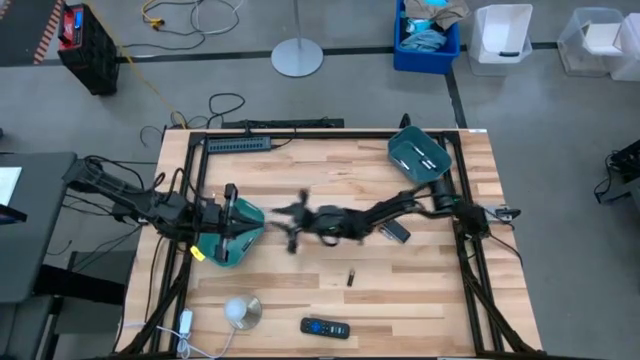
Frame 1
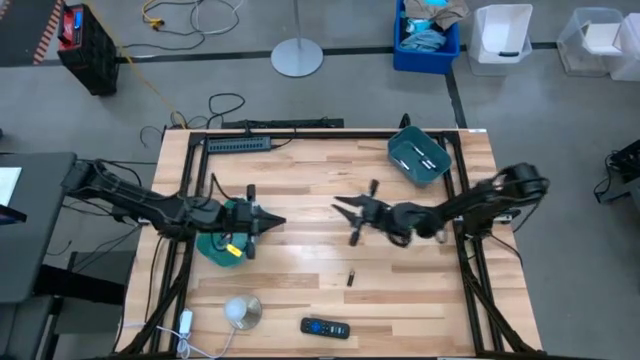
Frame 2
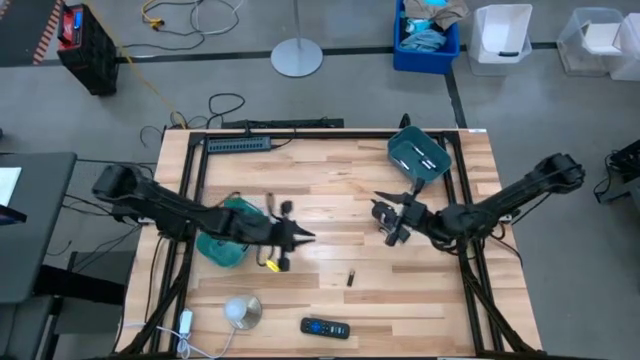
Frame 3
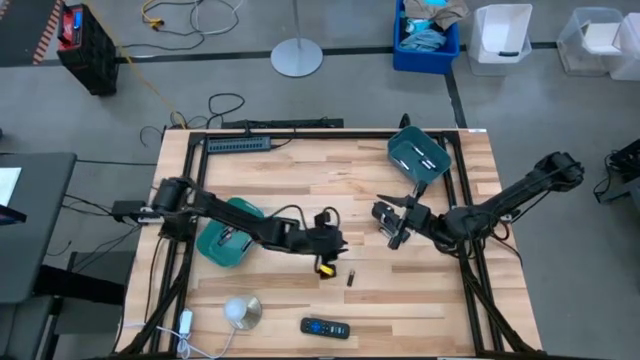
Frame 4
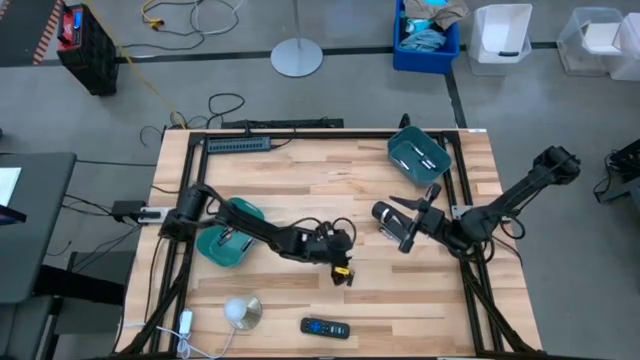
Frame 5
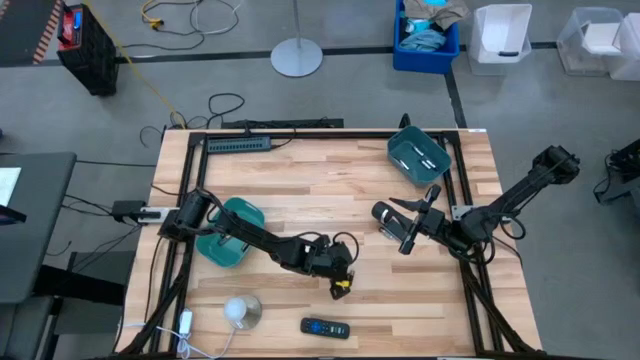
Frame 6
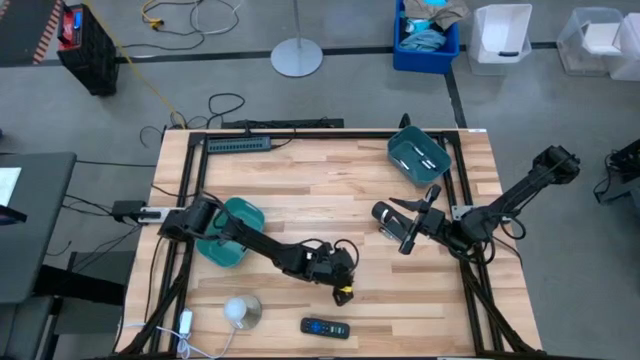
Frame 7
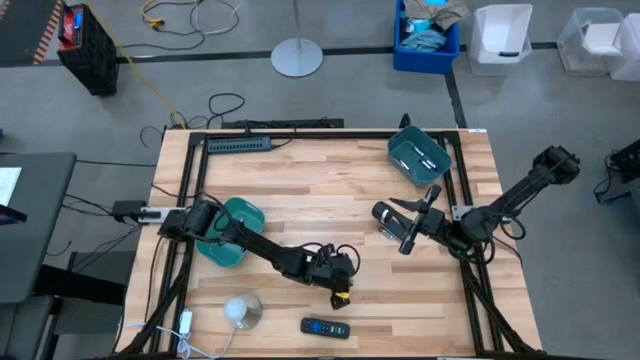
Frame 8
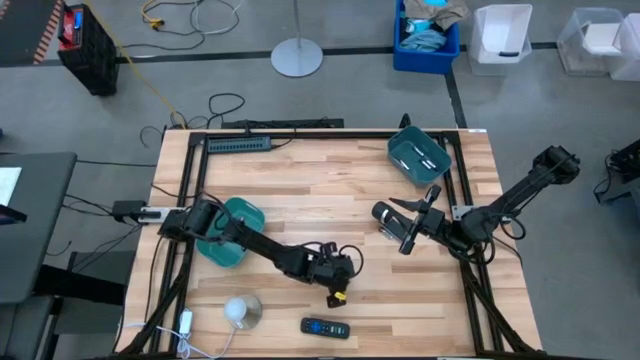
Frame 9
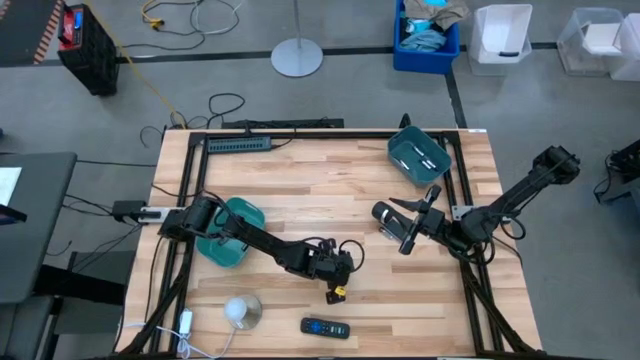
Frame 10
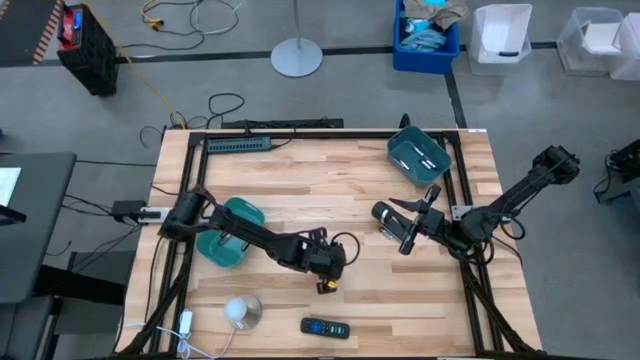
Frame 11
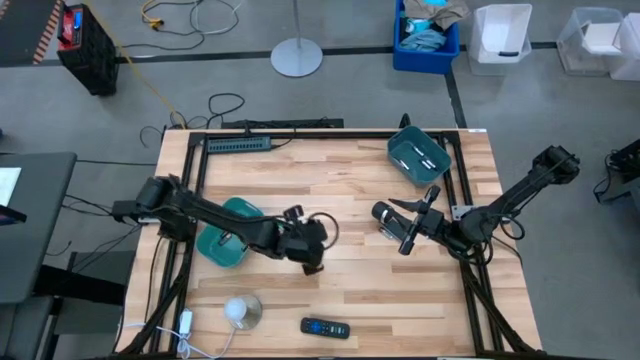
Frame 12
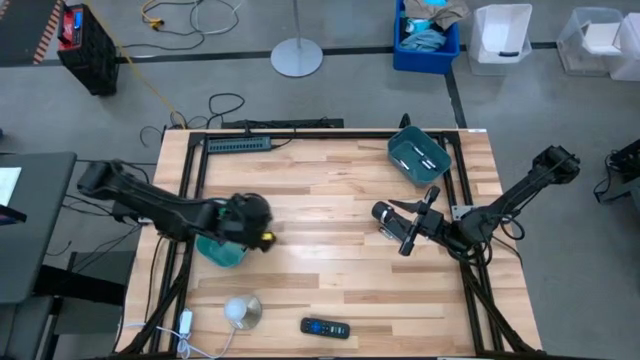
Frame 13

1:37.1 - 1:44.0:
Task: Sort batteries
Put the black battery into the green bin

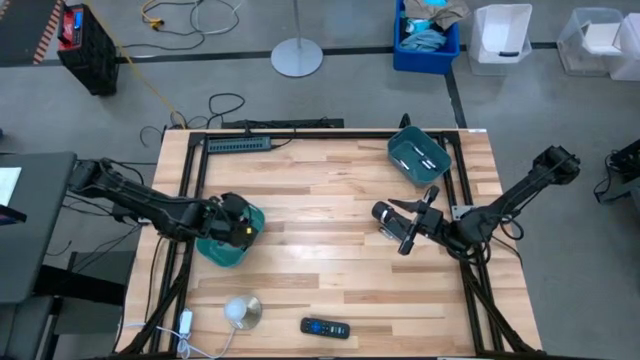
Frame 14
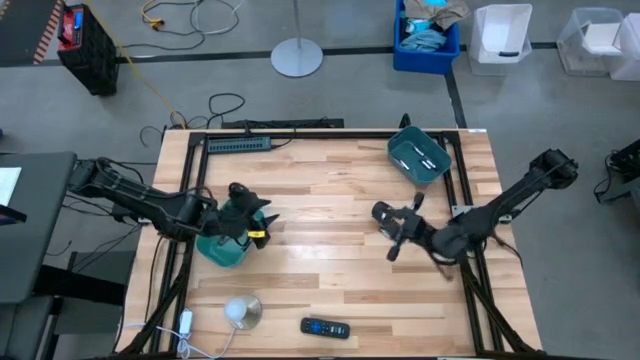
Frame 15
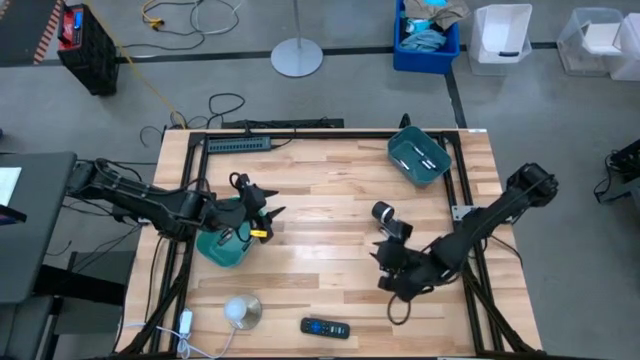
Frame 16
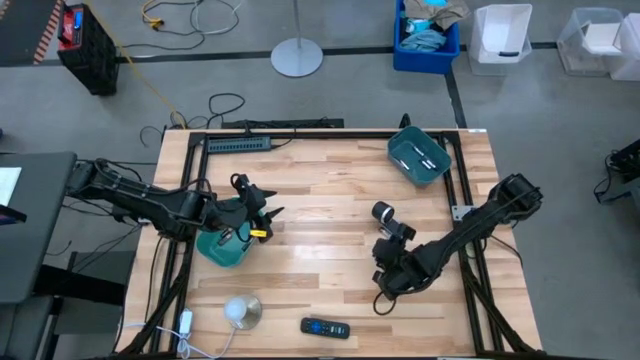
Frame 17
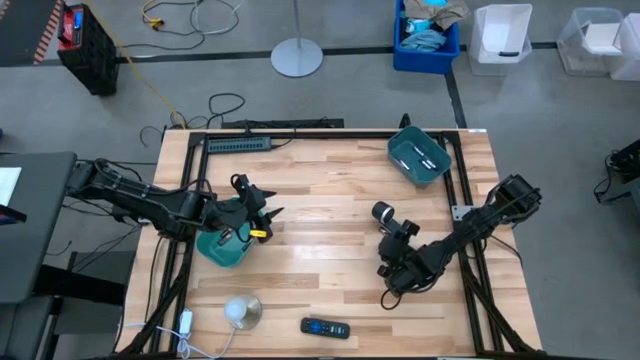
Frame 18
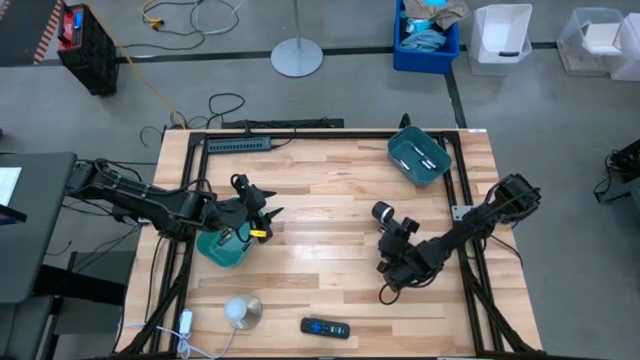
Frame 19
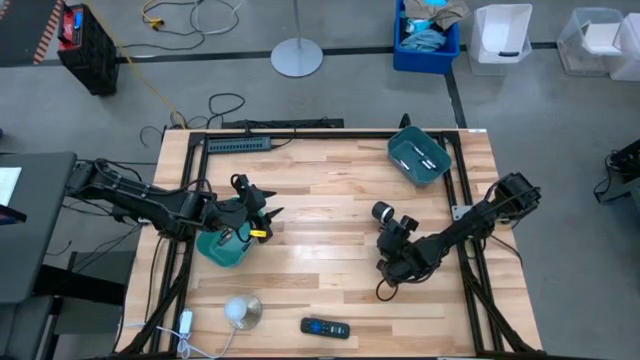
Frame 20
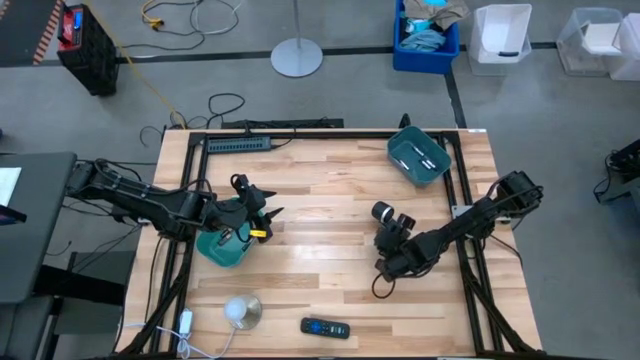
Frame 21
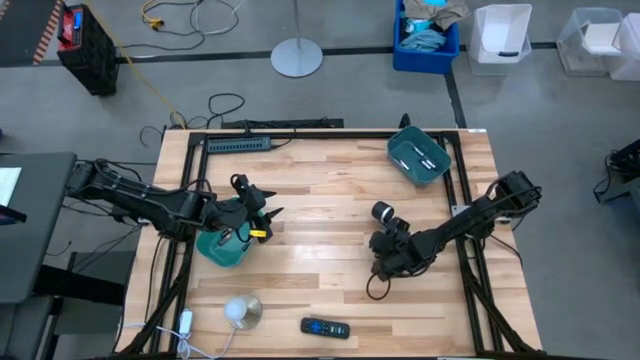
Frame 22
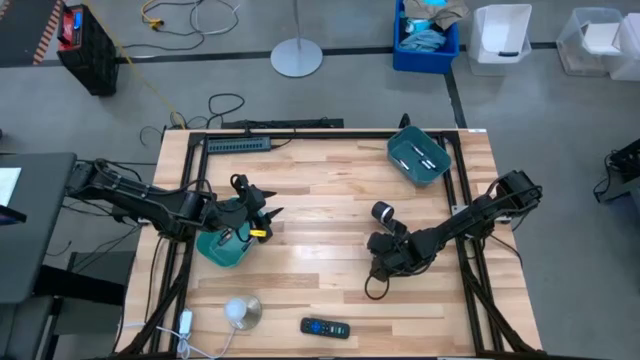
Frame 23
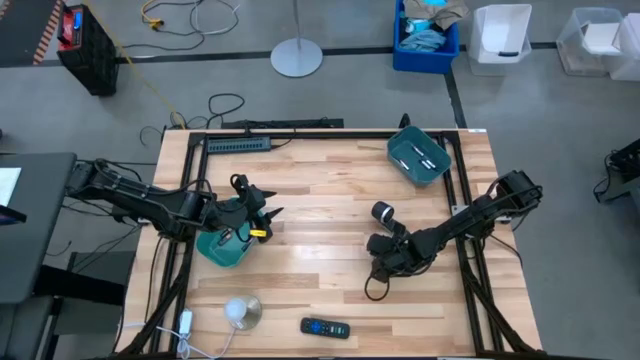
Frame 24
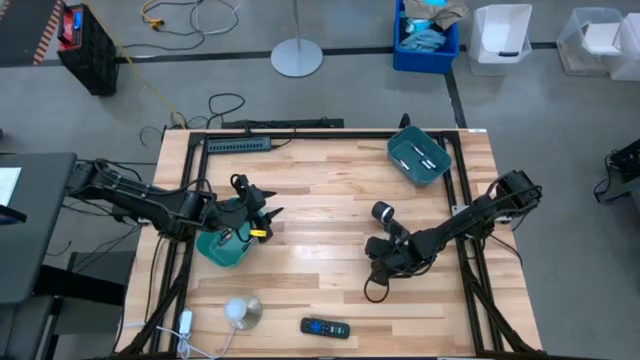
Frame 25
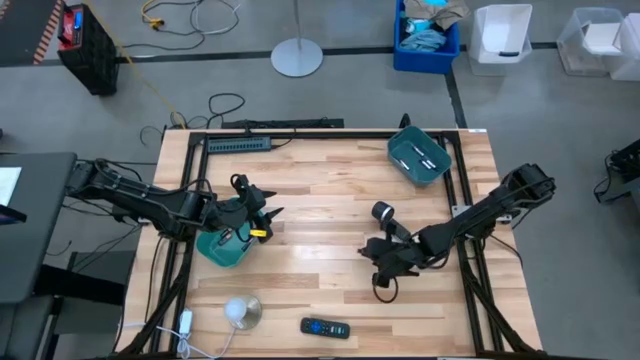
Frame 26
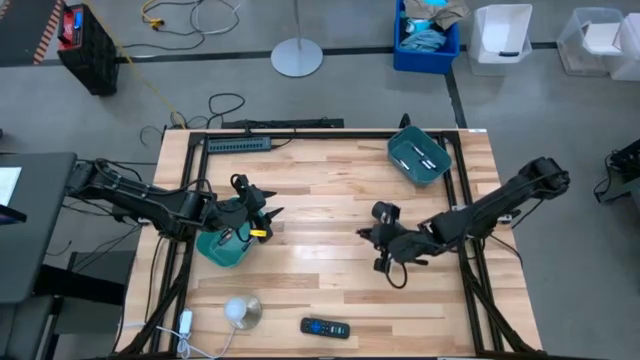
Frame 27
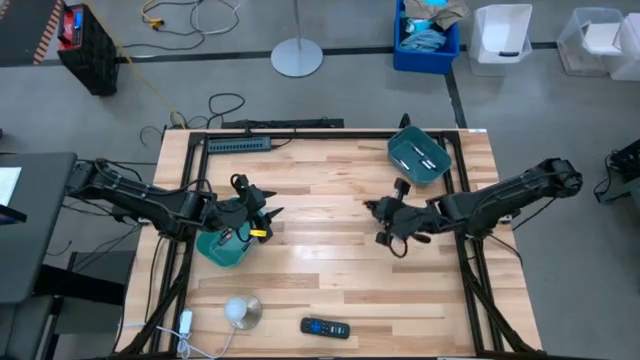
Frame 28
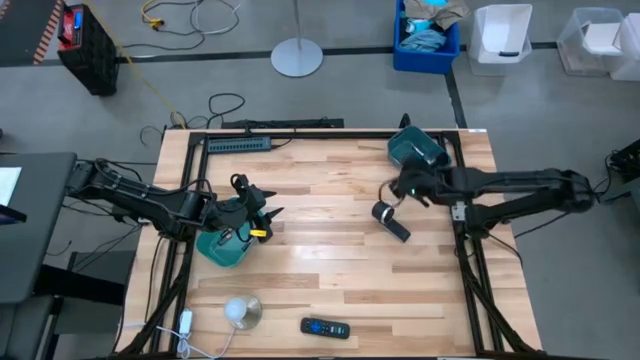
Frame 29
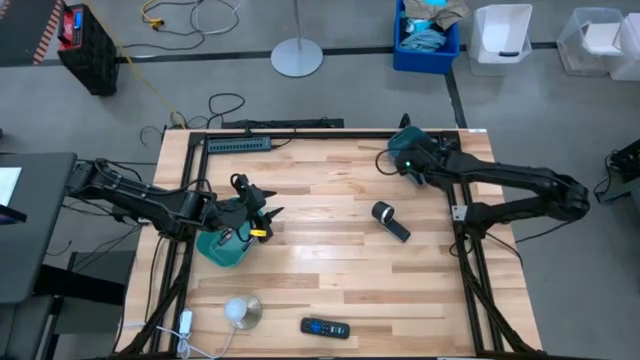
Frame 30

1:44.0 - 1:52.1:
Put the silver battery into the blue bin

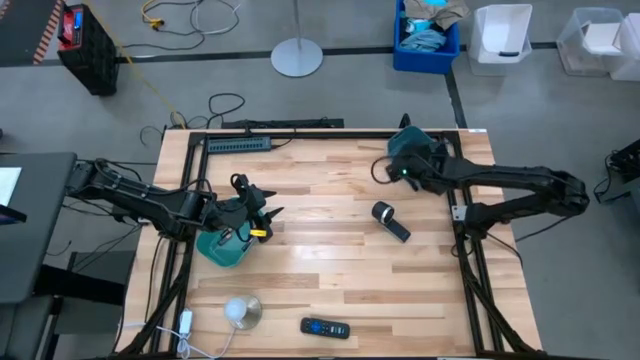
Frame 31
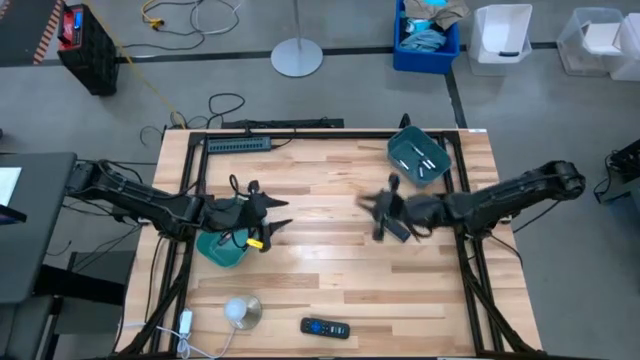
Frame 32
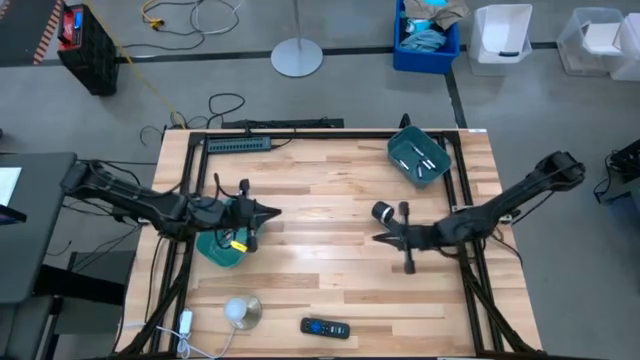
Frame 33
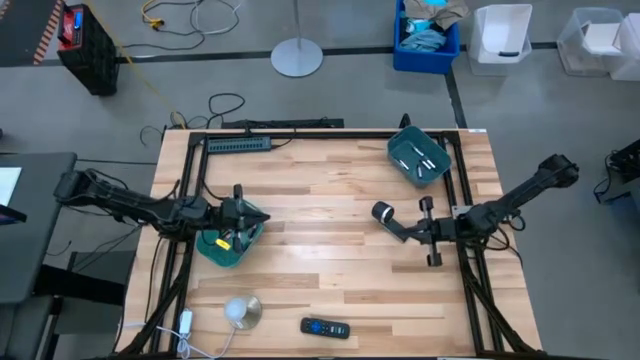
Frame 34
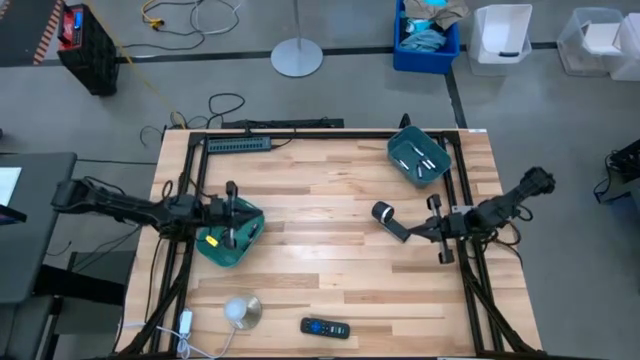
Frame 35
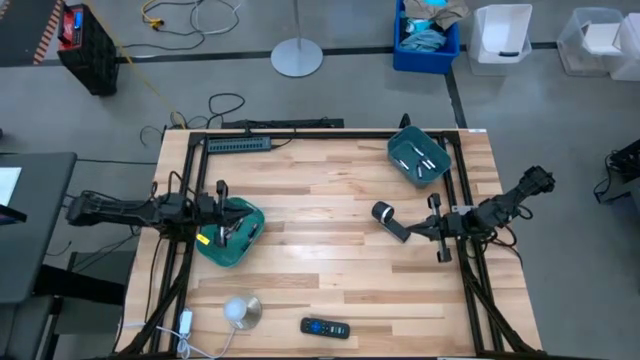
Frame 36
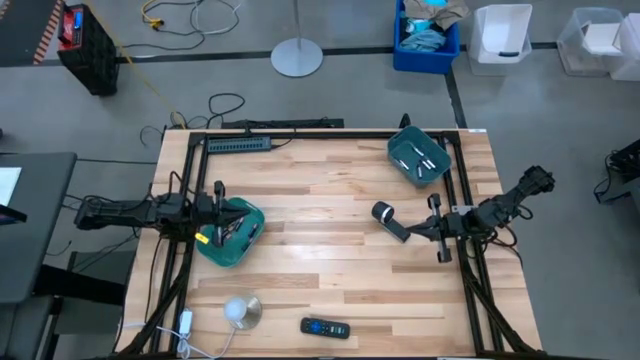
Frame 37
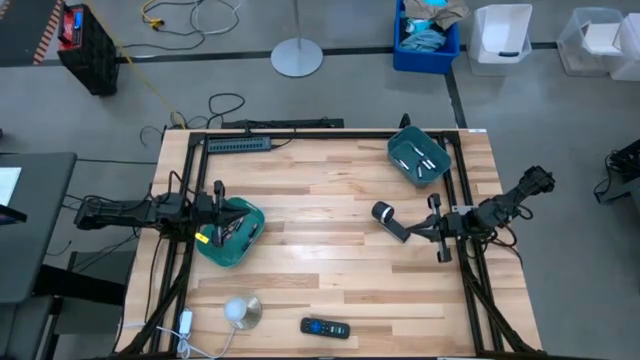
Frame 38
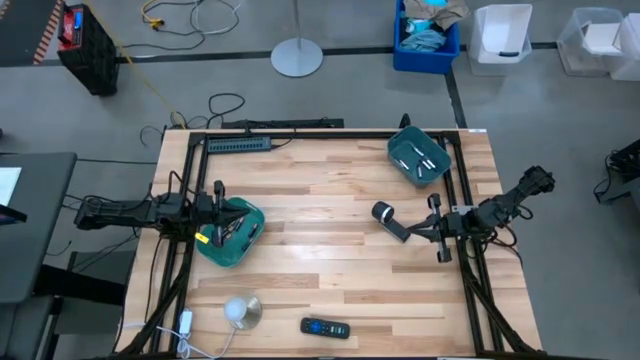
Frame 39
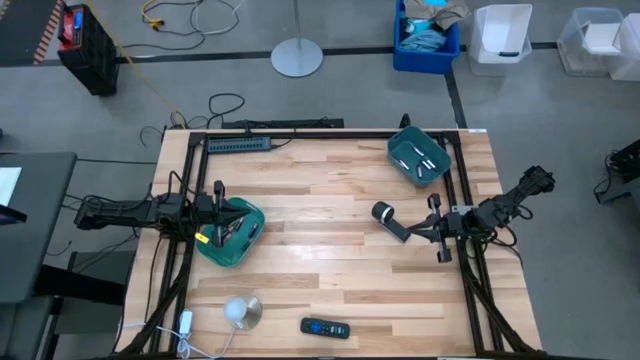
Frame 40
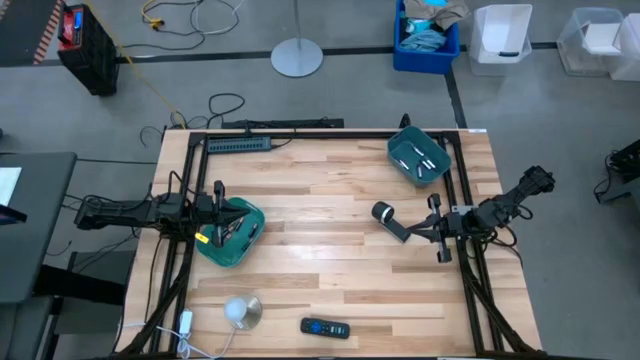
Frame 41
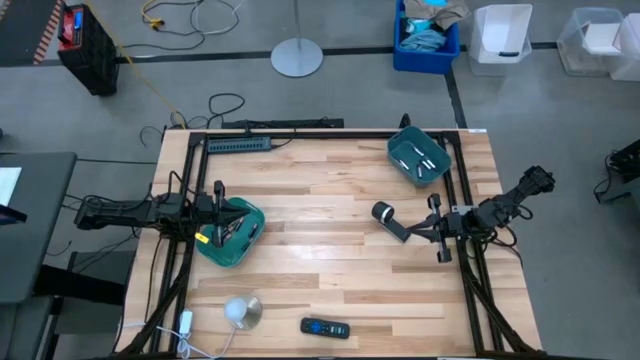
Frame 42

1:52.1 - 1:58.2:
Return to Home Position

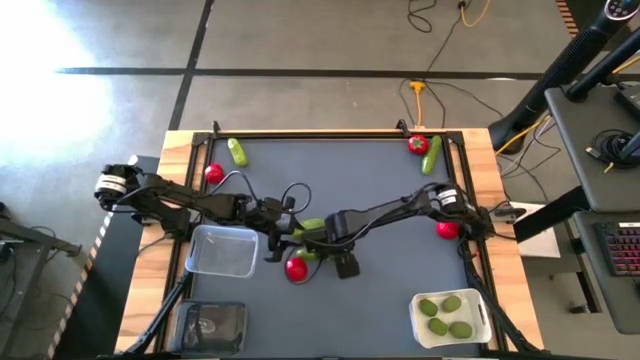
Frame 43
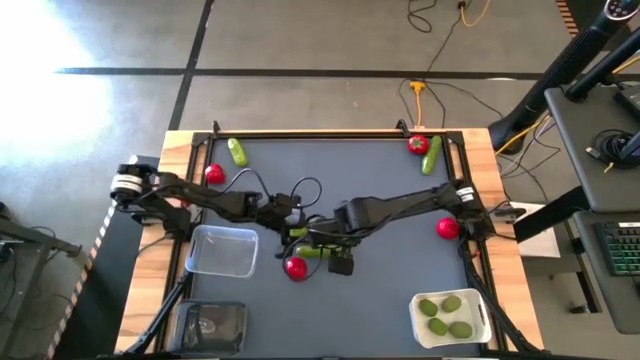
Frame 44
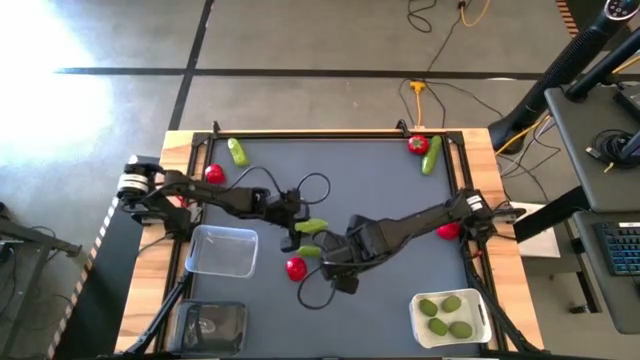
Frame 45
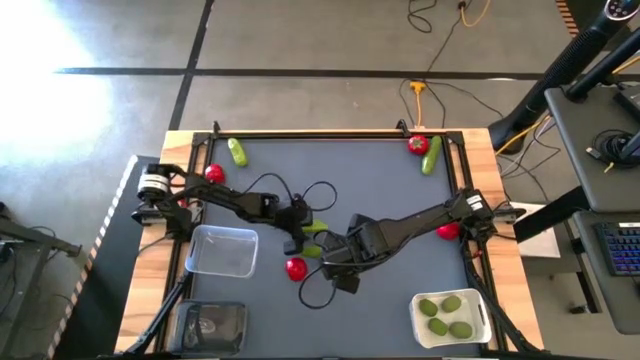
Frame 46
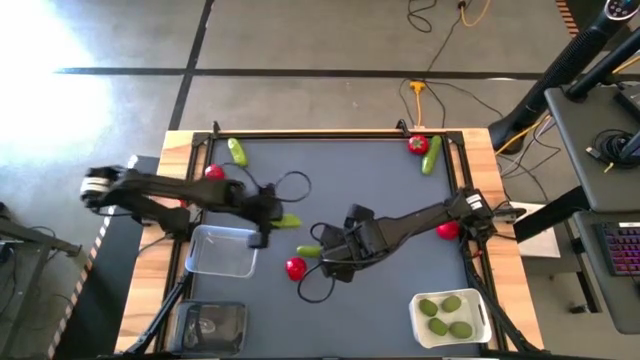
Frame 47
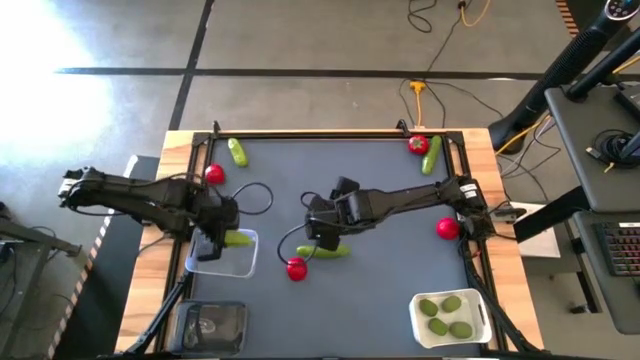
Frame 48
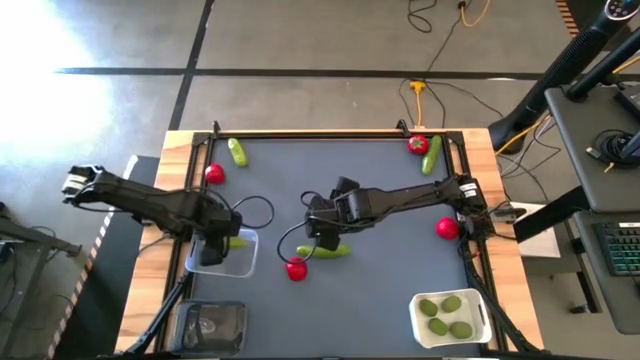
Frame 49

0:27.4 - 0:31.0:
Task: Sort produce into baskets
Put the middle cucumber into the transparent bin
